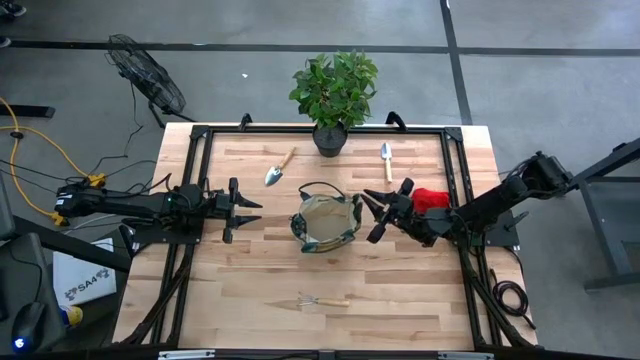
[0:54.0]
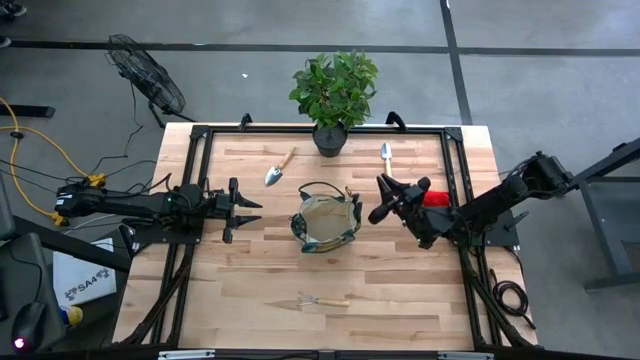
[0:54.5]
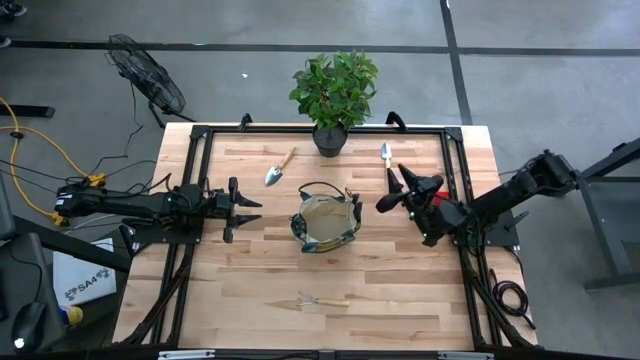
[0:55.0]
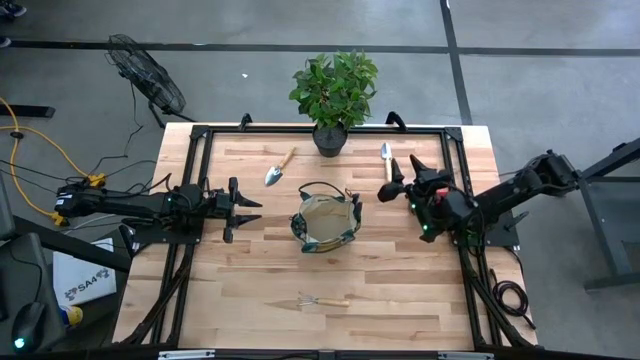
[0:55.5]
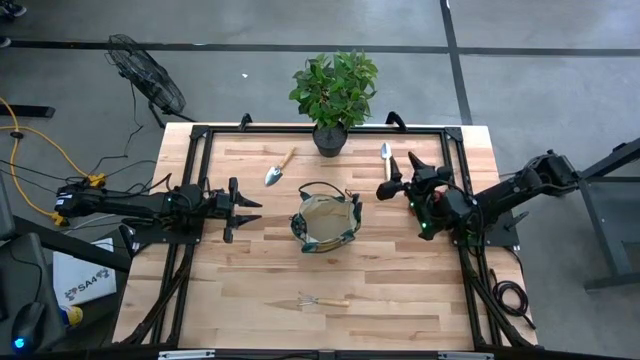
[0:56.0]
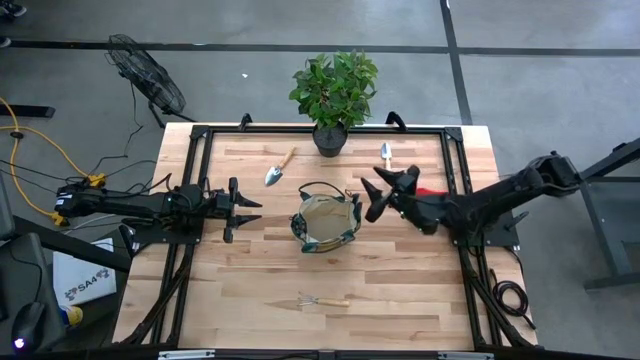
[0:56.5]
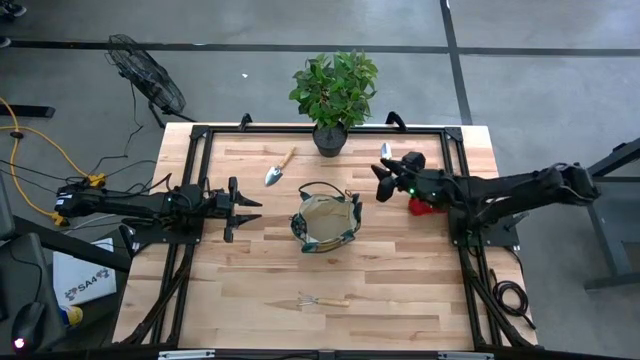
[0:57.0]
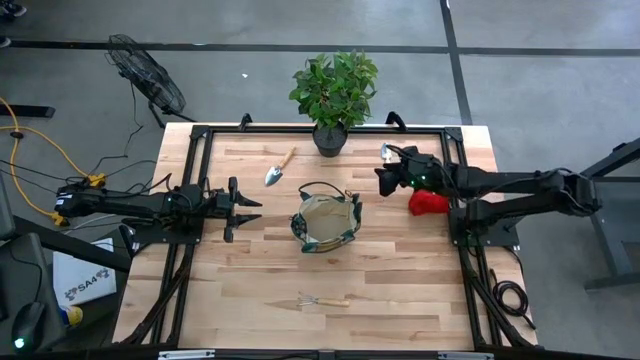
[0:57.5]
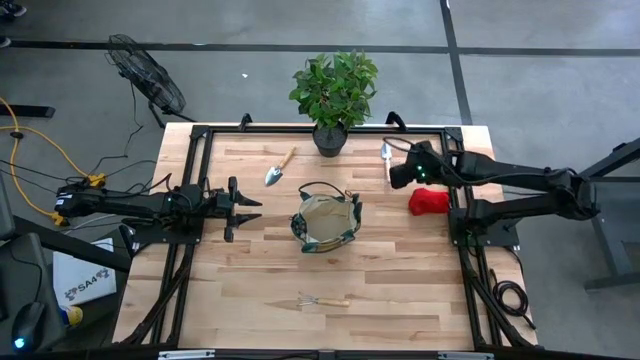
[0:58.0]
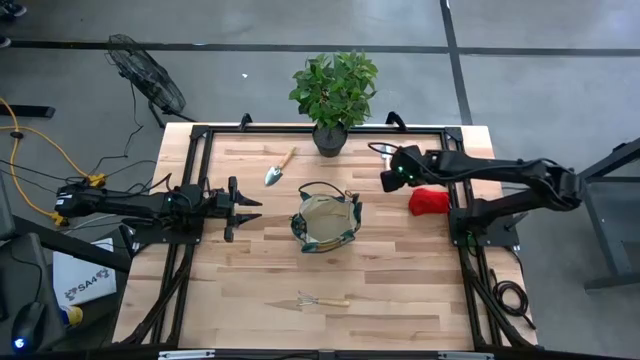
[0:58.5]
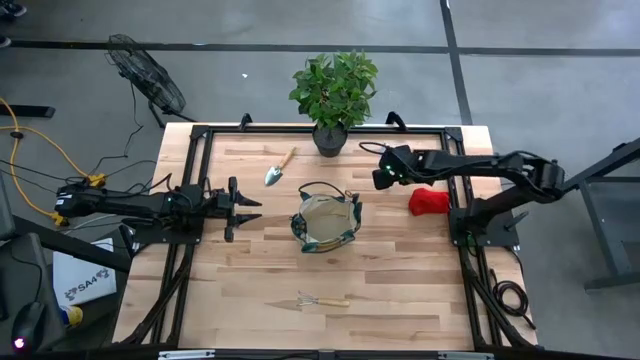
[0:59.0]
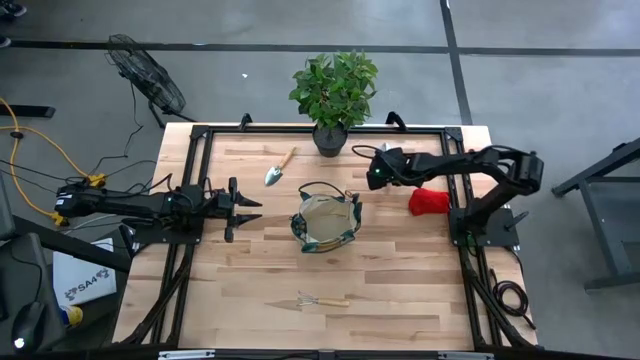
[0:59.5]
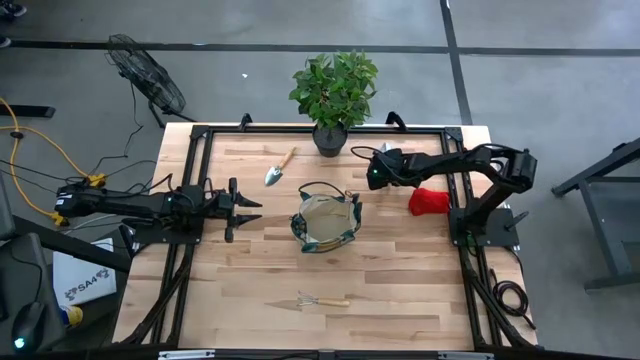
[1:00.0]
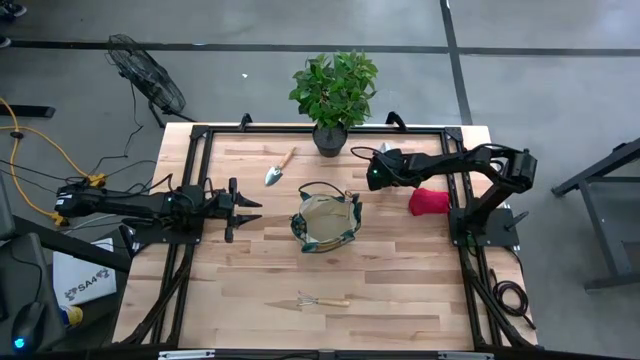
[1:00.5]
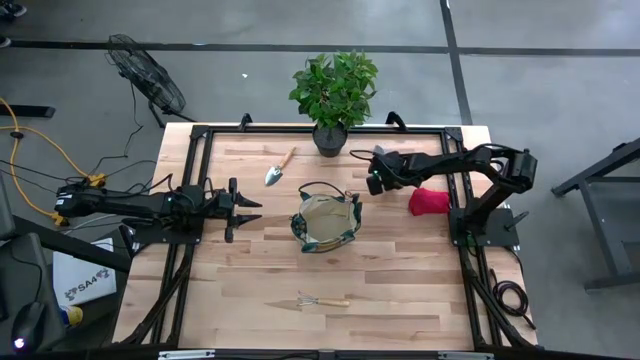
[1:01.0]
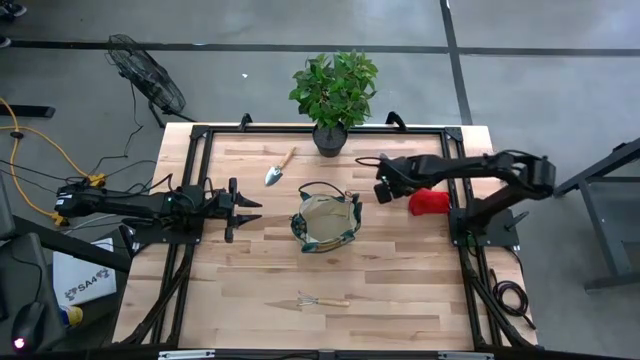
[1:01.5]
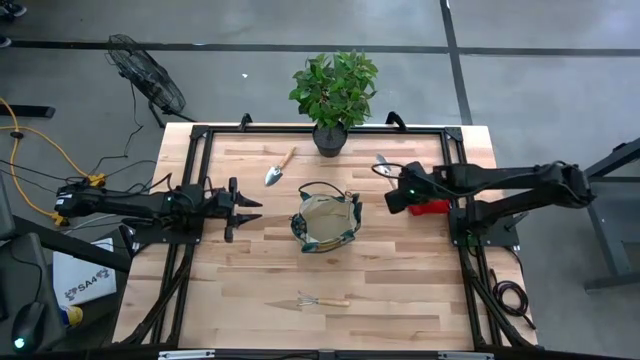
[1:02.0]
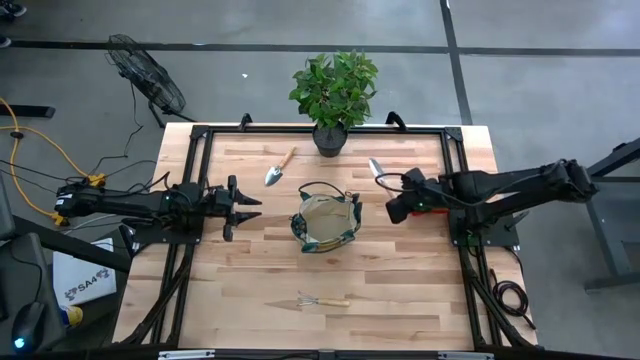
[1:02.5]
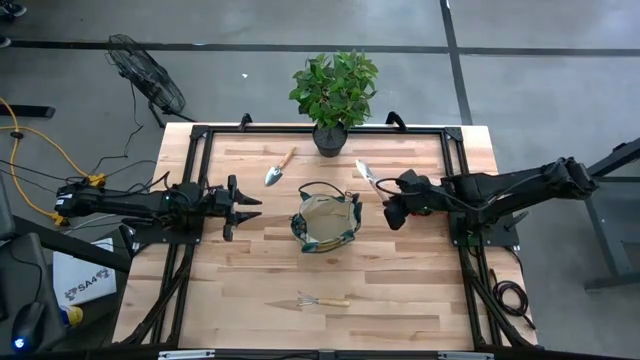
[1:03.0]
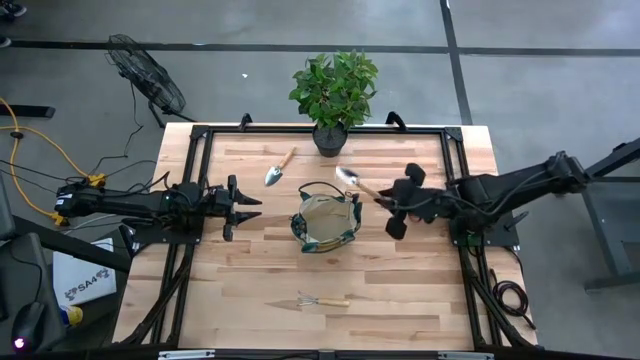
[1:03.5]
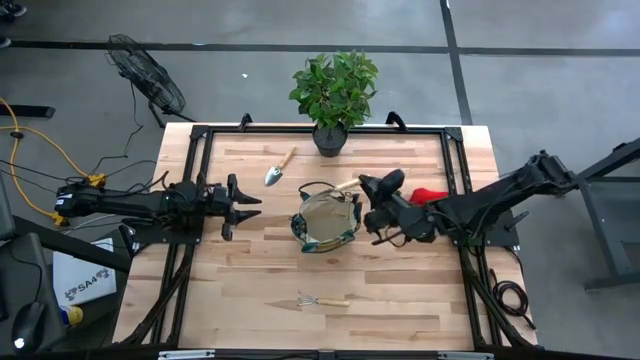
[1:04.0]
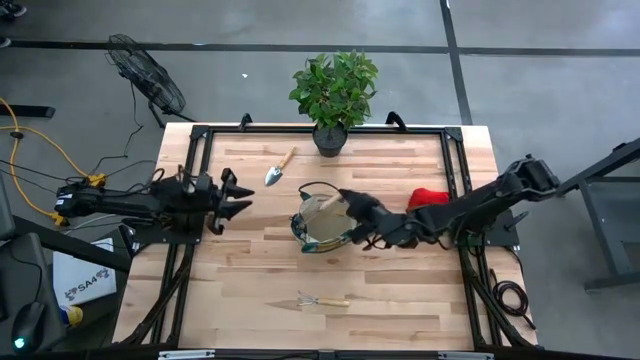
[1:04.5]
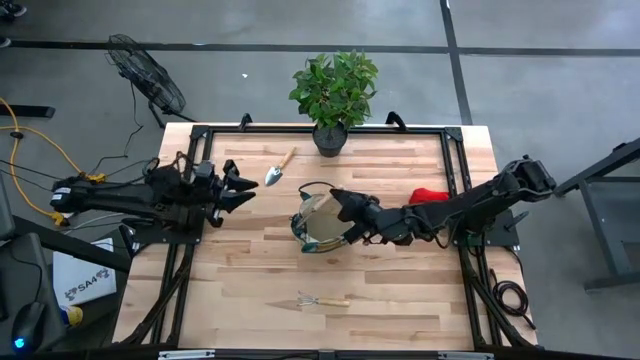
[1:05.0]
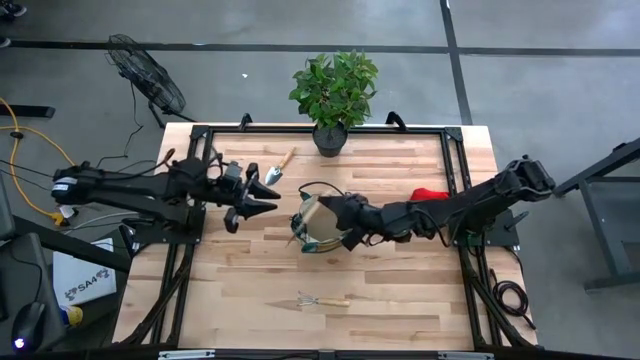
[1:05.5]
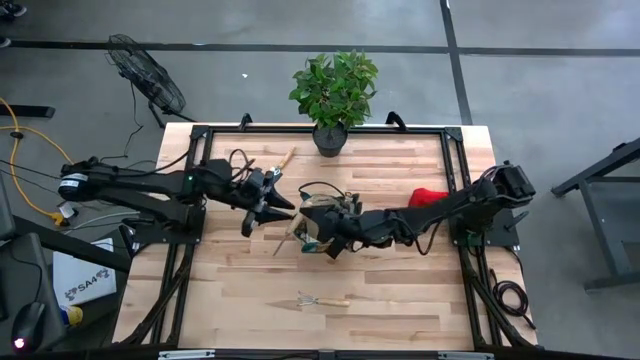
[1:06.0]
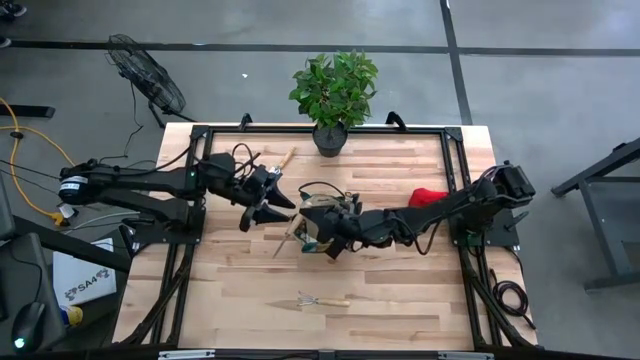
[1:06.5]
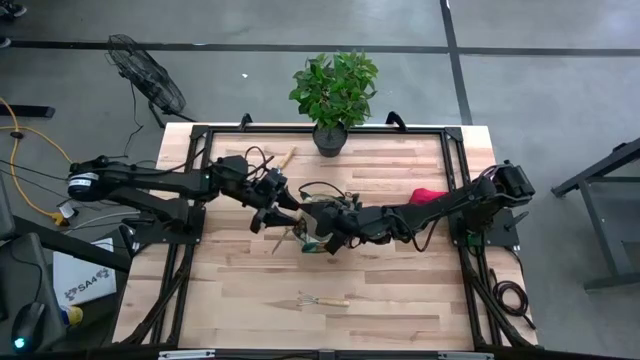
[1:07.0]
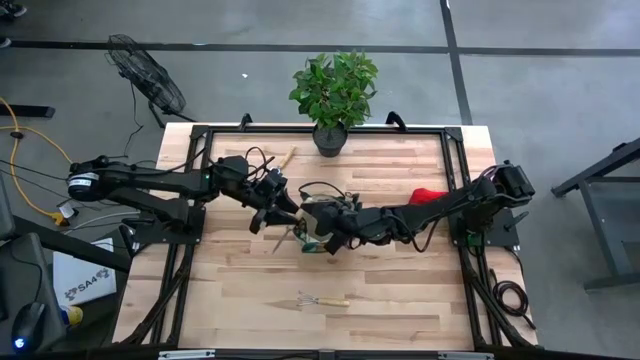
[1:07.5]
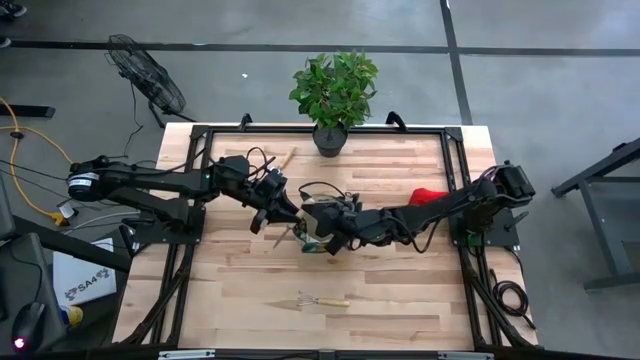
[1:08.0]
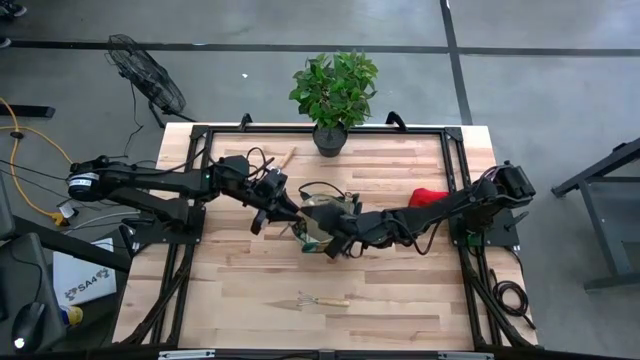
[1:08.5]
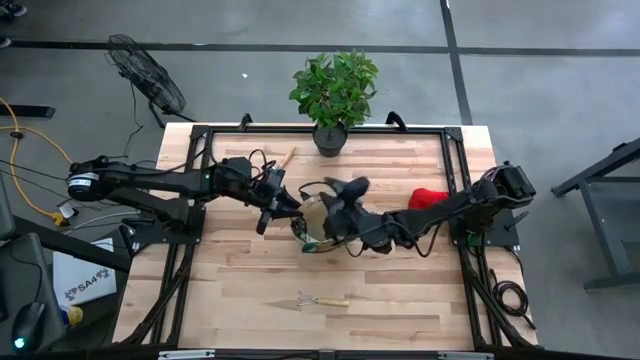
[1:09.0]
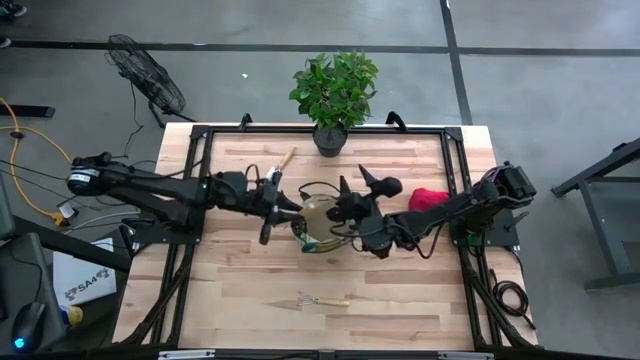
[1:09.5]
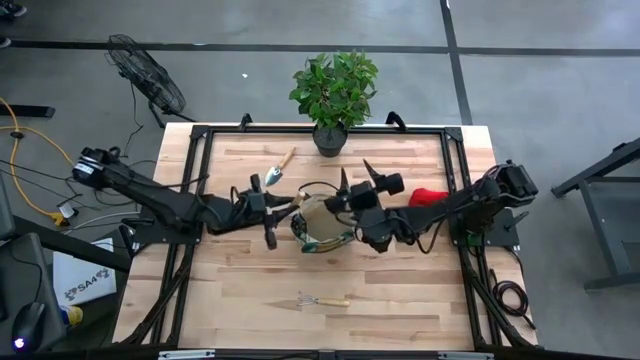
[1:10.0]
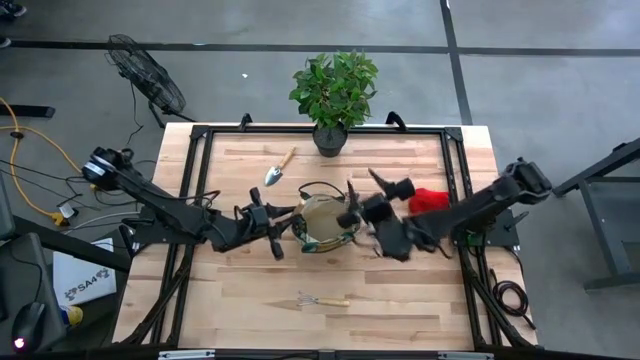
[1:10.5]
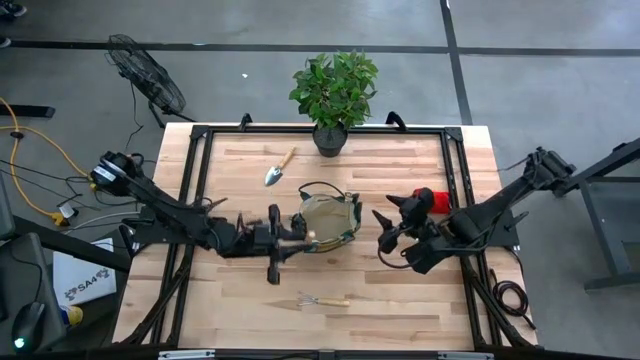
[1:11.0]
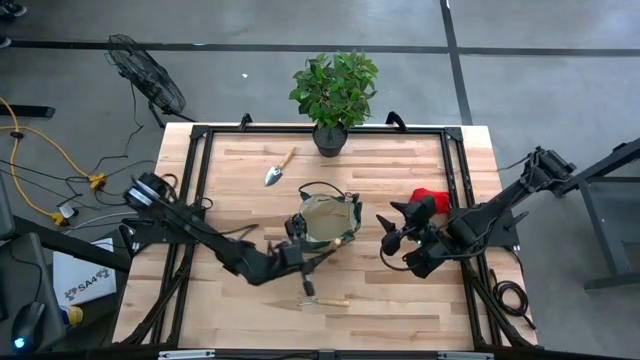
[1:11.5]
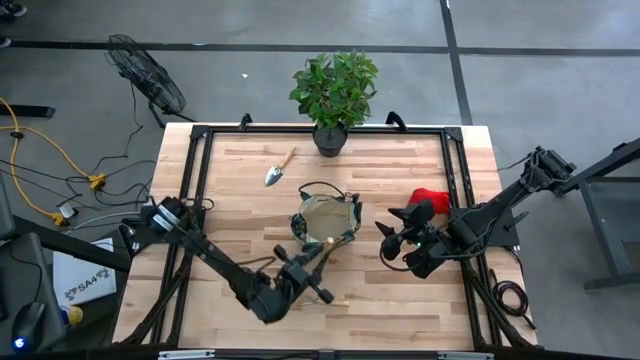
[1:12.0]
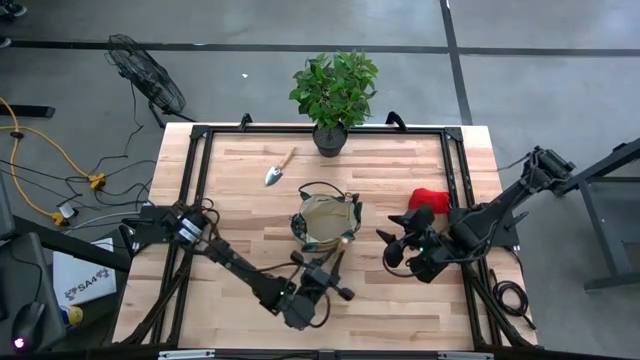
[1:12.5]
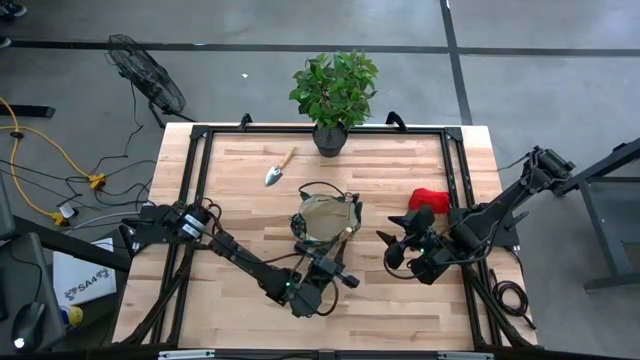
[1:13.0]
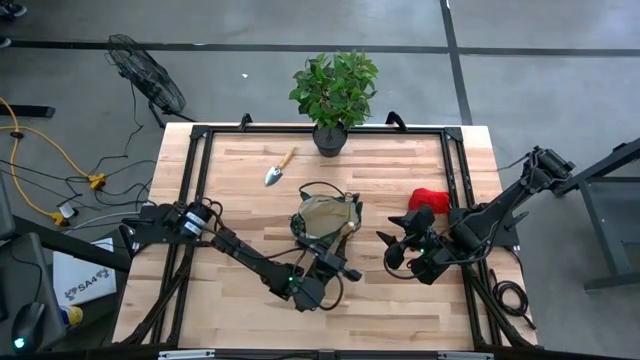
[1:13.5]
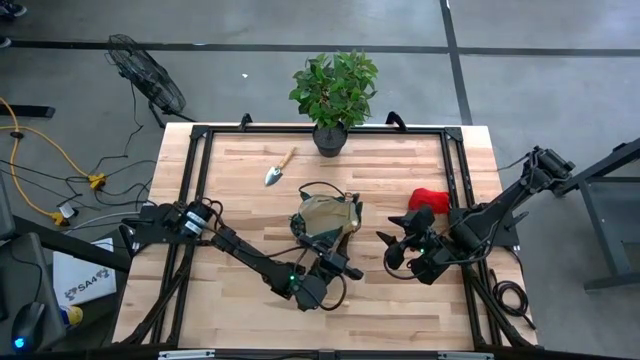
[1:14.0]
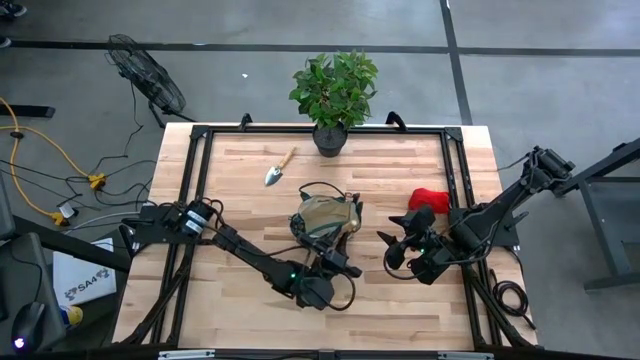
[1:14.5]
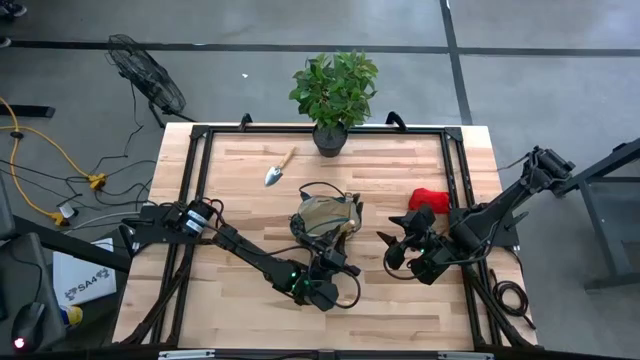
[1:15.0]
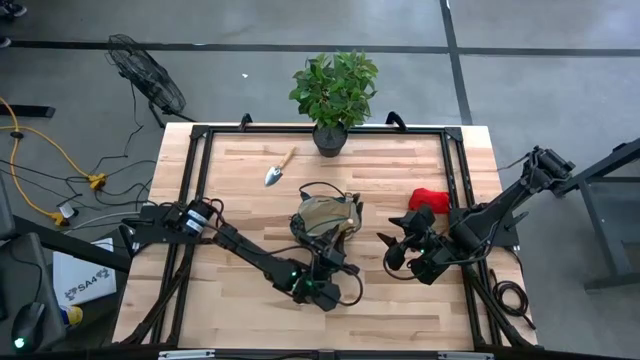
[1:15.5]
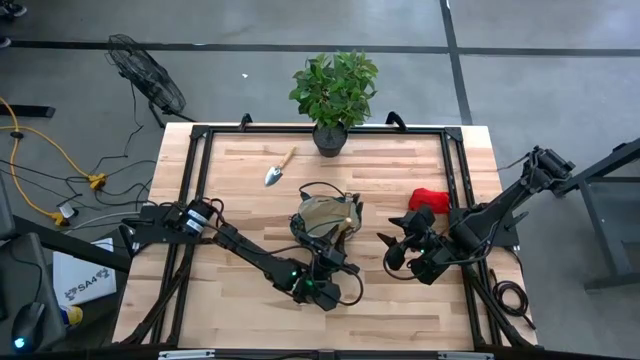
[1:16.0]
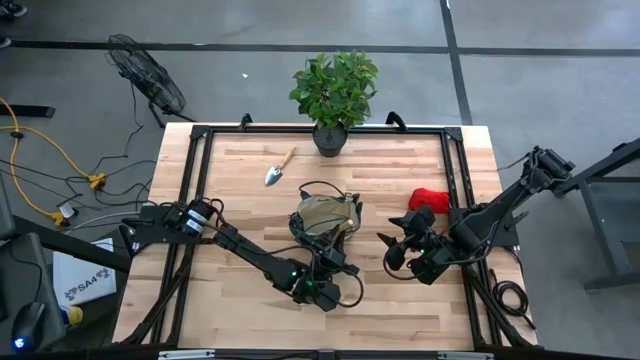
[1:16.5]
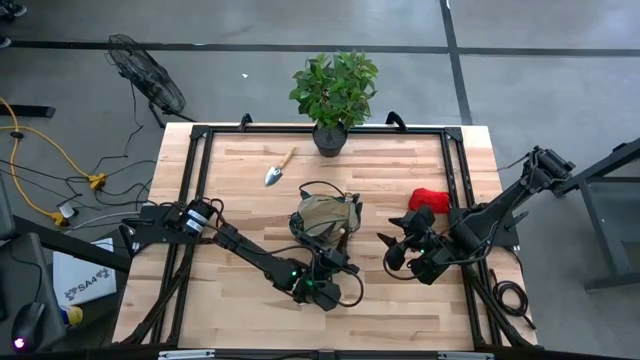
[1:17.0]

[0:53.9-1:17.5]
Task: Pick & Place Garden tools in Gardening bag
Put the right brown trowel into the gardening bag
